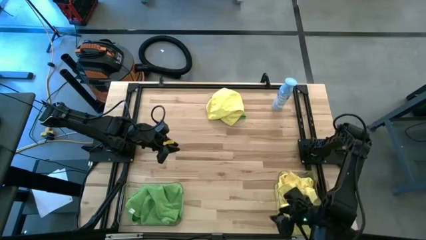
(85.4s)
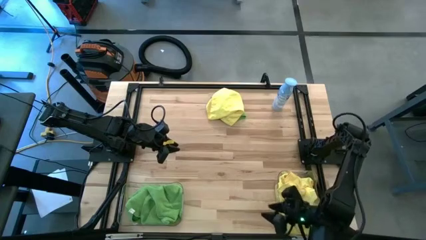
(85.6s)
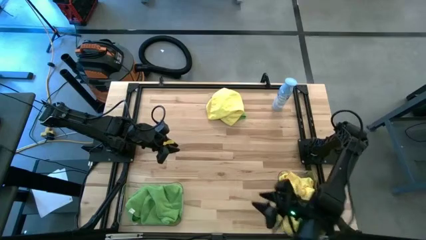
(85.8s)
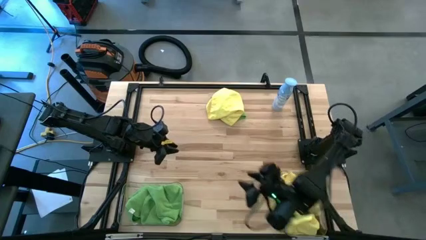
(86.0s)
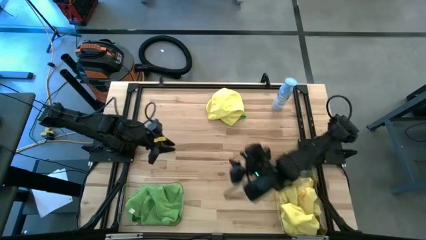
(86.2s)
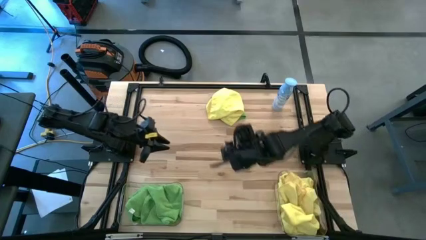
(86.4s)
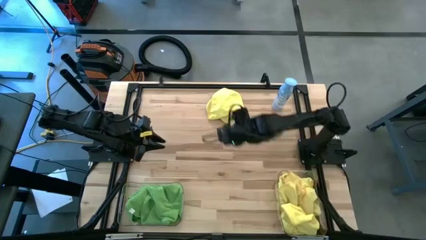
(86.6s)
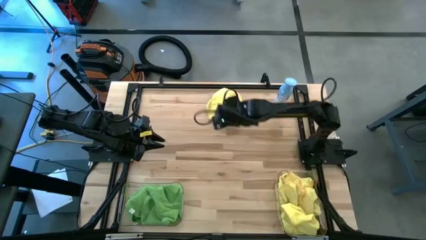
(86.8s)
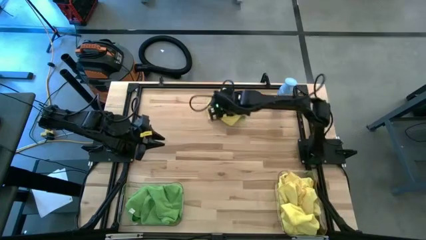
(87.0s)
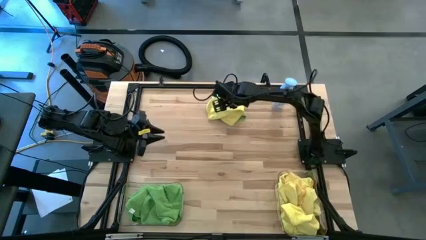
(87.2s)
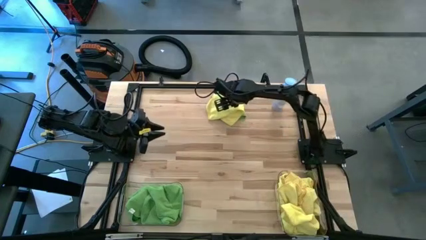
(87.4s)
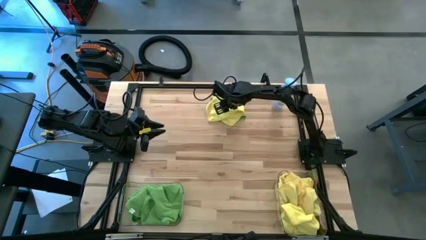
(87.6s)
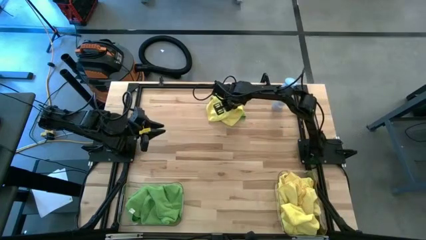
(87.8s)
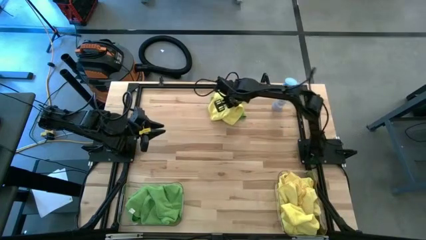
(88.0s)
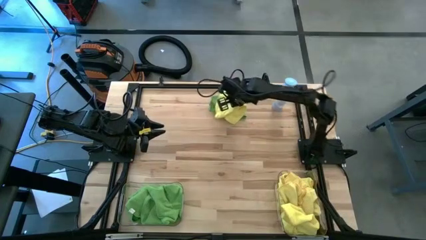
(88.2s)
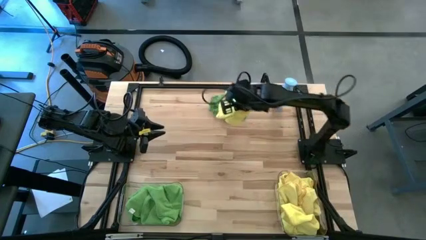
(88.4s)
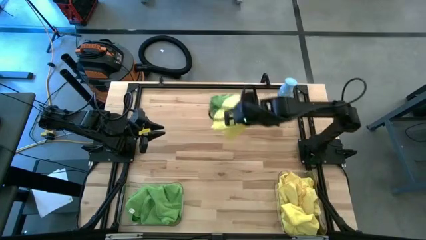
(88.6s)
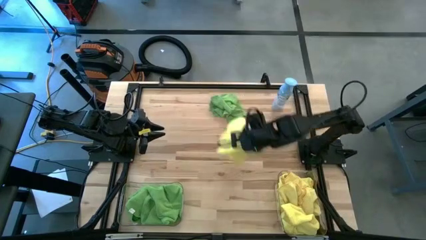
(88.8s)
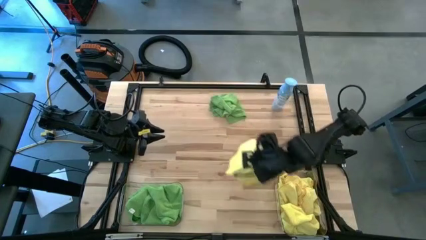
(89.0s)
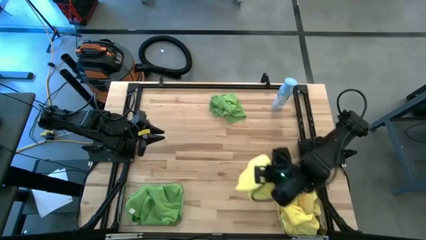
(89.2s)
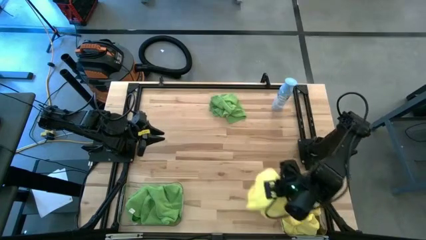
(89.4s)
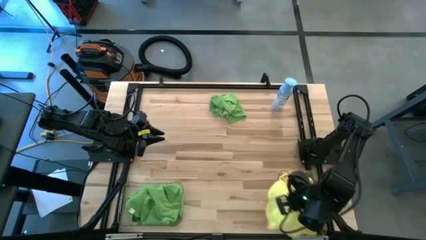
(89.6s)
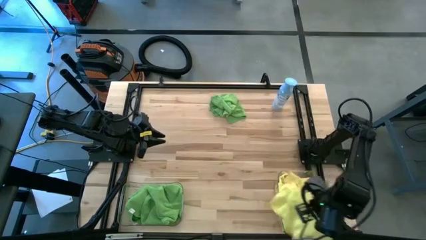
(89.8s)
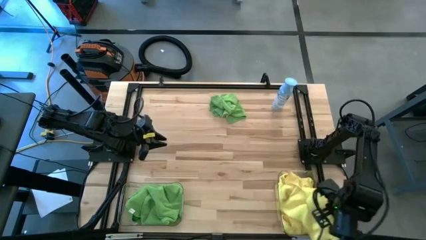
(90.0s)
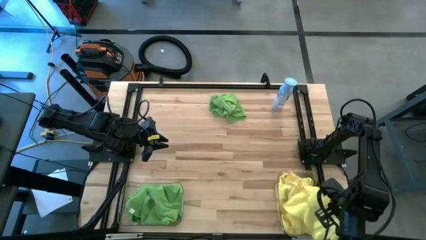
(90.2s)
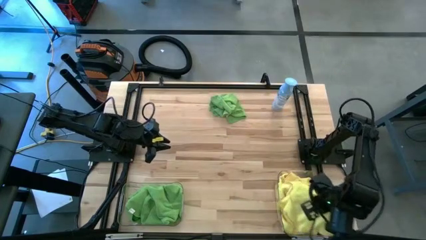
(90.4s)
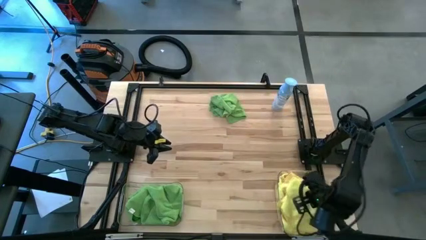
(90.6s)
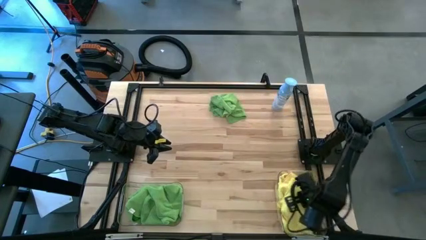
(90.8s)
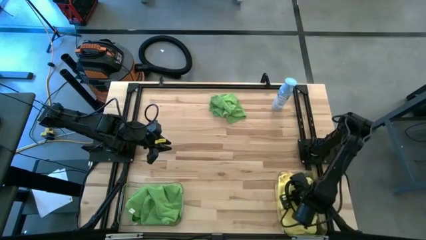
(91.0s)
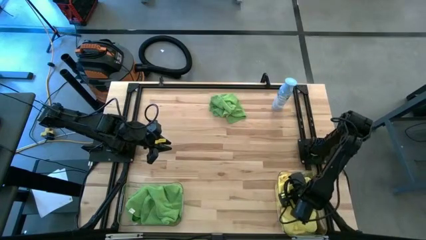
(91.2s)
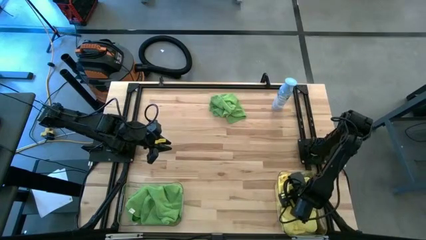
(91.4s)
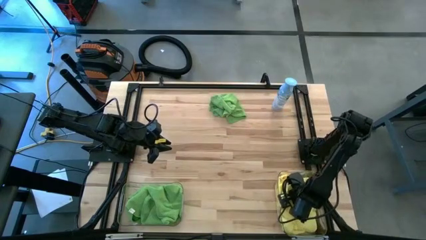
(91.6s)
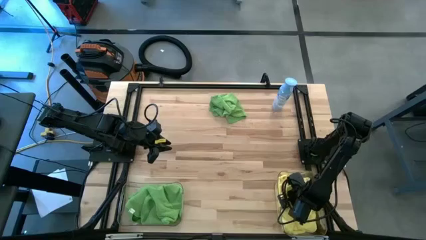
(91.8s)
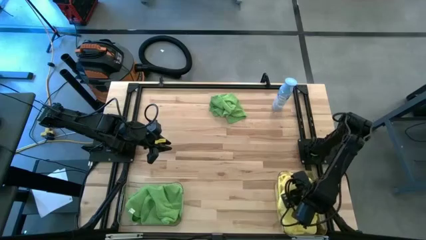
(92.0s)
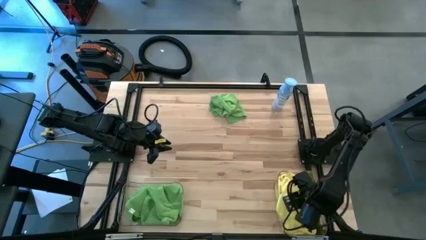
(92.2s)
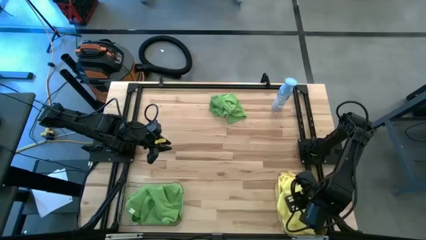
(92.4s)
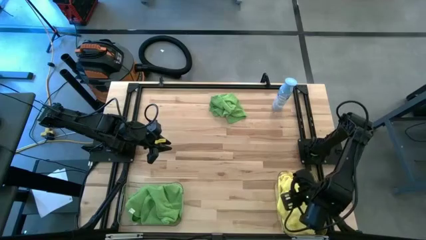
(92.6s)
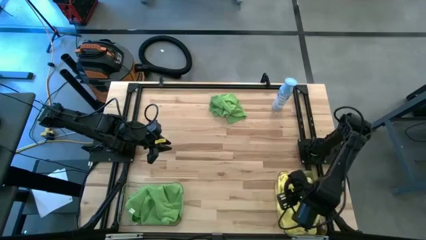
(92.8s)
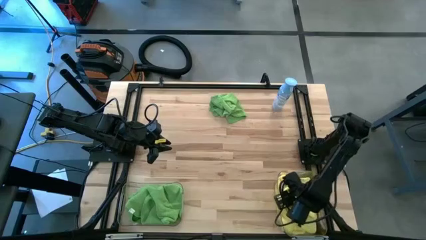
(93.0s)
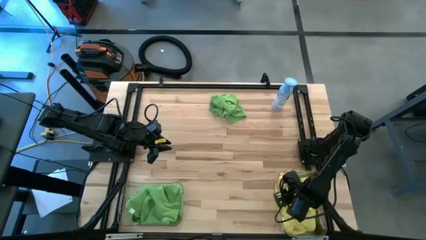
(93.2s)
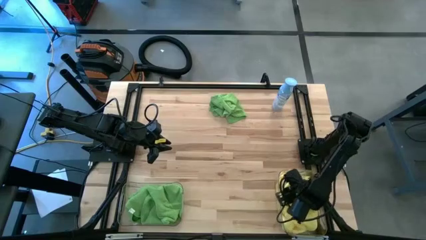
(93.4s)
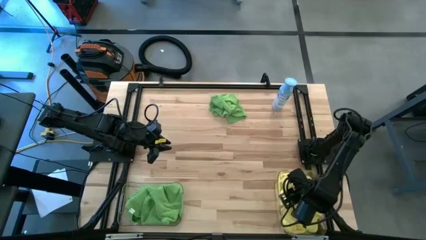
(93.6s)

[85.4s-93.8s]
Task: Sort microfiber towel by color & place in baskets
Put the yellow microfiber towel into the right transparent bin

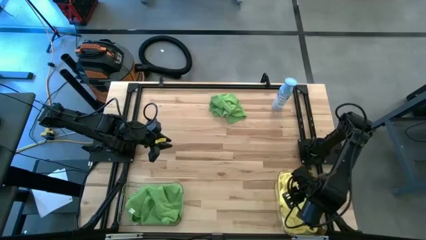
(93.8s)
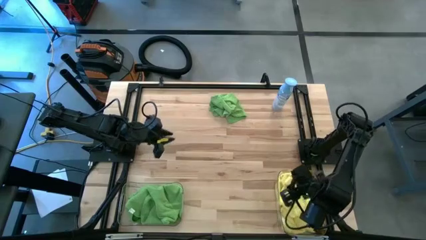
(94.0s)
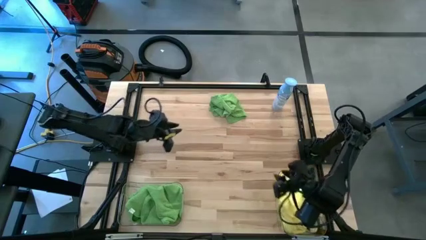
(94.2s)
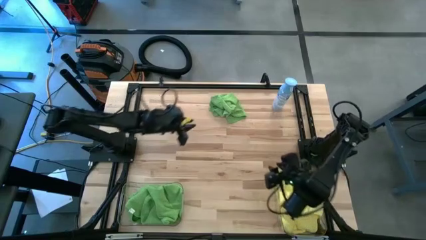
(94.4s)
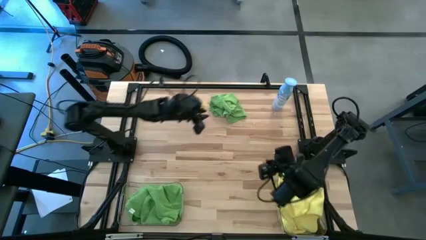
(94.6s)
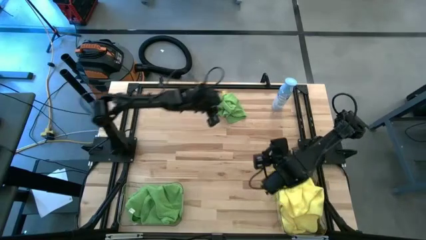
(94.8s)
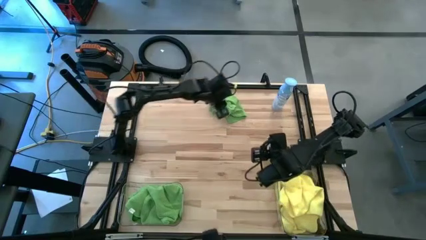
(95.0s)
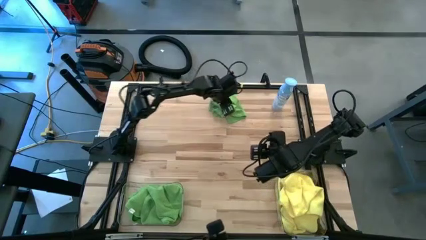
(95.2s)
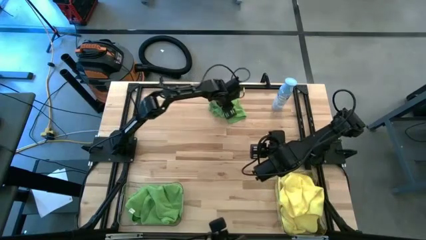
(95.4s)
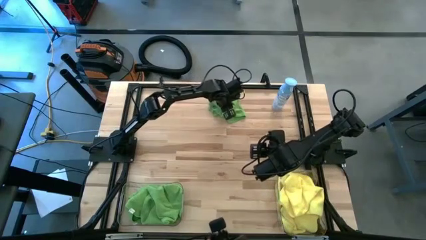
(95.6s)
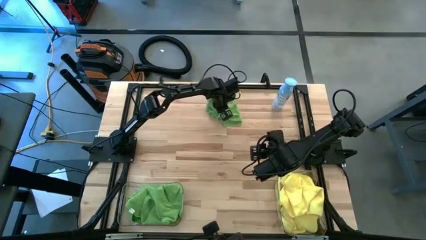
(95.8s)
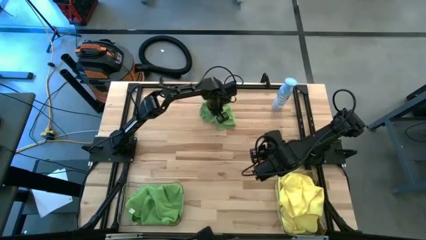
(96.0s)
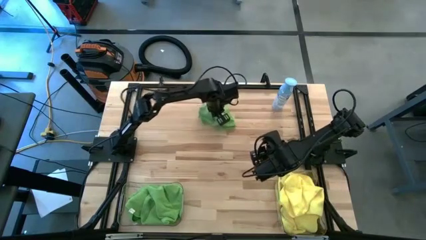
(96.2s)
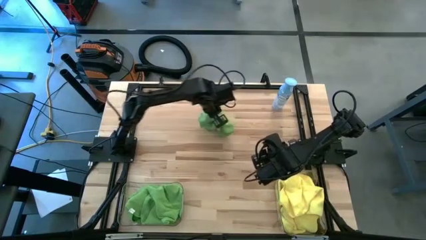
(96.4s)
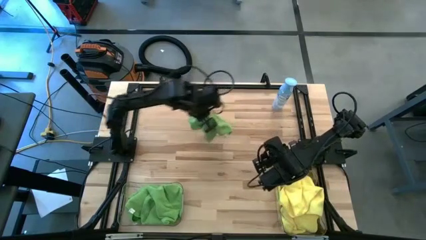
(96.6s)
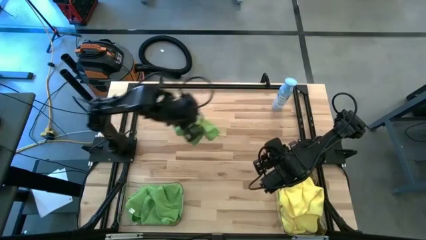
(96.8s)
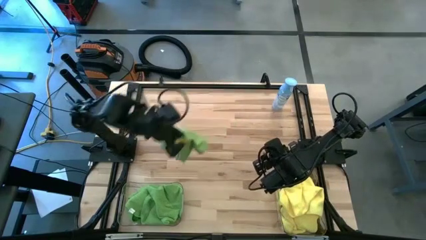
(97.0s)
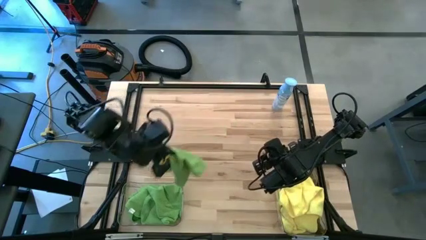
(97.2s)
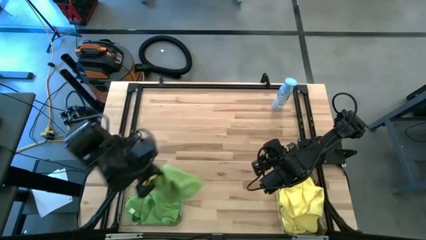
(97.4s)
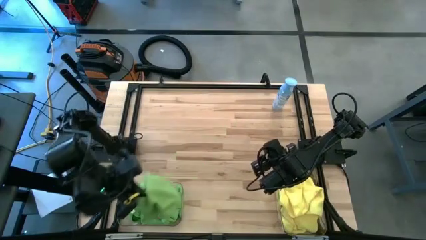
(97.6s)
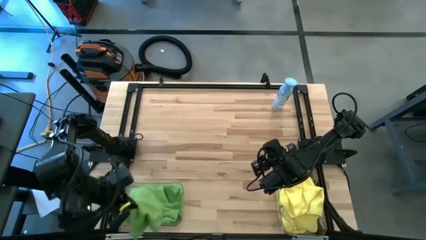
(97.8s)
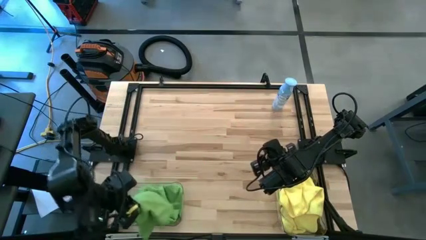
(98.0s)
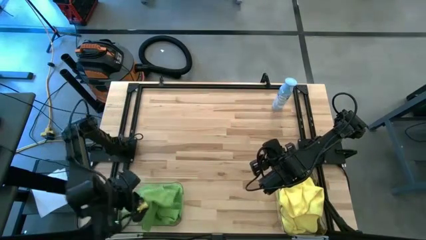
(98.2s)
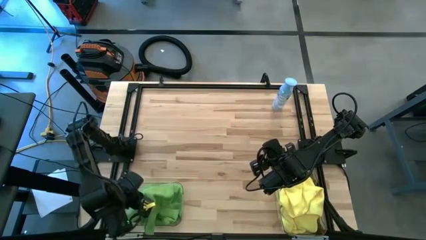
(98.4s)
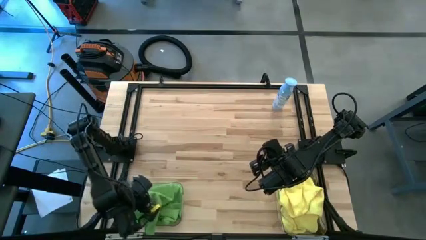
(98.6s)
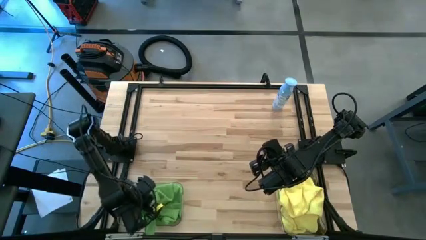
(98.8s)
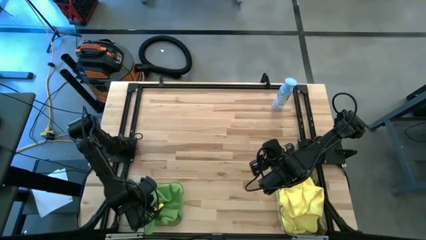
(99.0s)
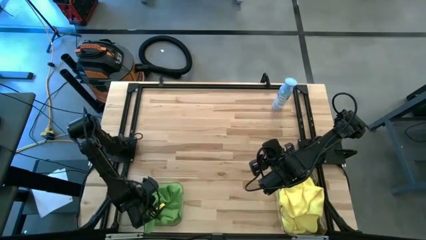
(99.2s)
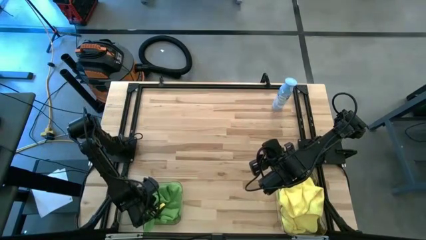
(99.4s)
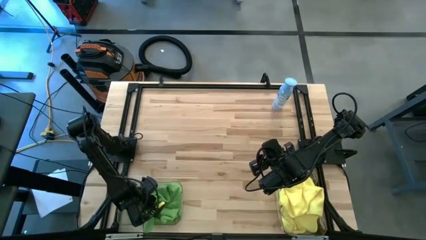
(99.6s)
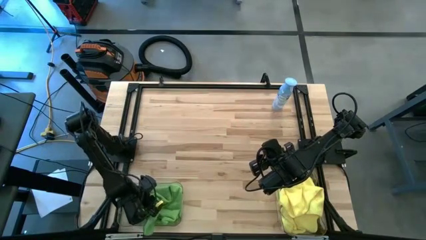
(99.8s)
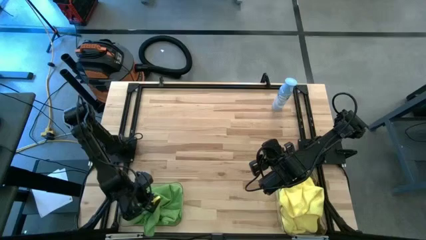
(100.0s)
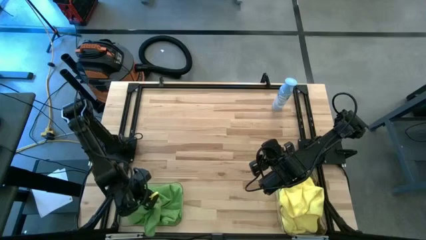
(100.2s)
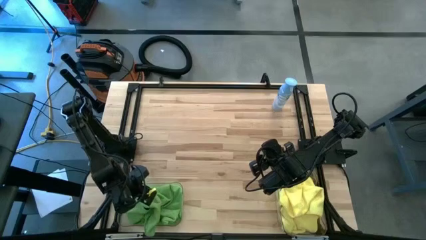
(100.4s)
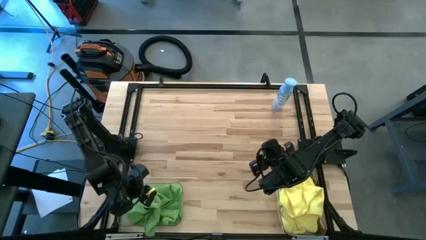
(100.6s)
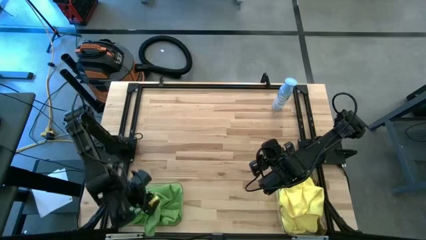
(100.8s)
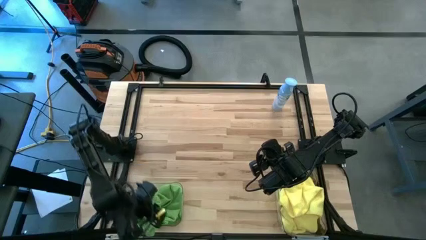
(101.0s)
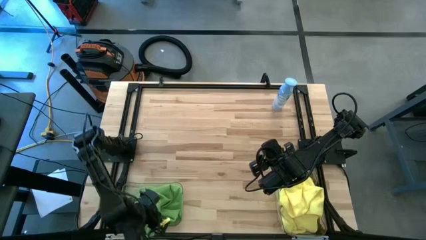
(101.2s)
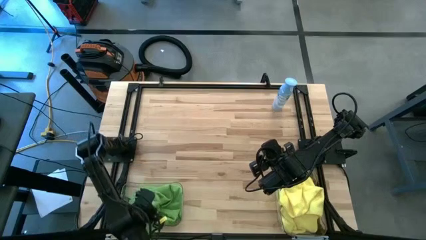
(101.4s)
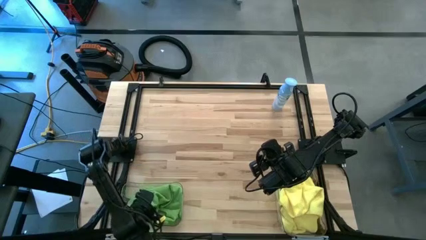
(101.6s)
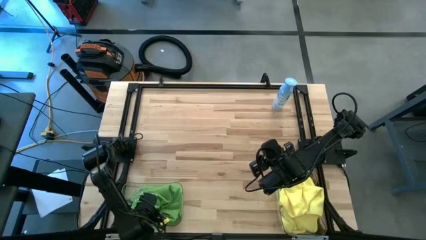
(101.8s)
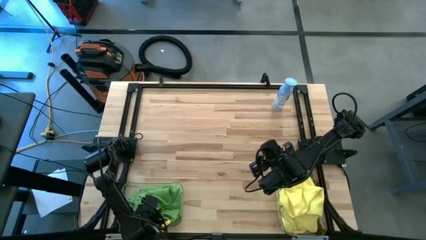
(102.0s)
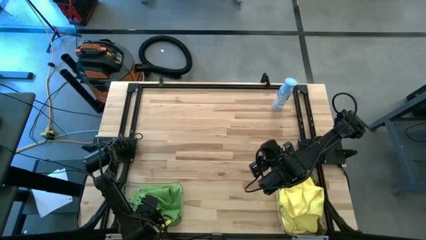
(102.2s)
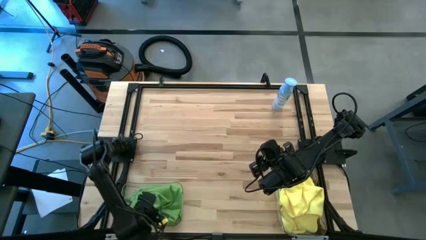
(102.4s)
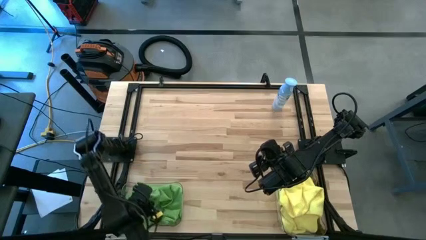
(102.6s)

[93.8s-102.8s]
Put the green microfiber towel into the left transparent bin
